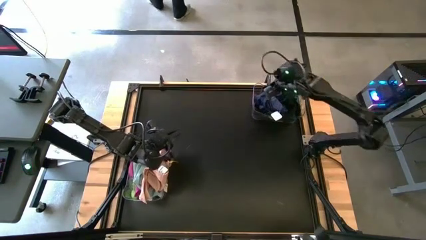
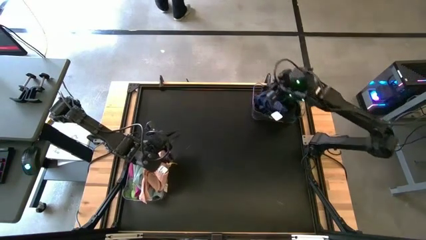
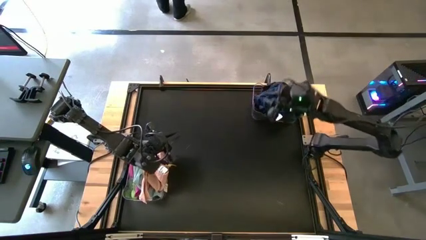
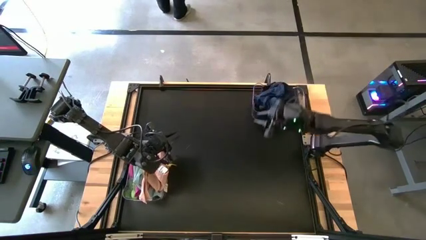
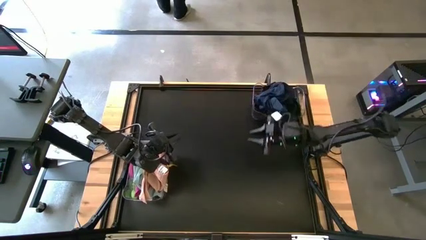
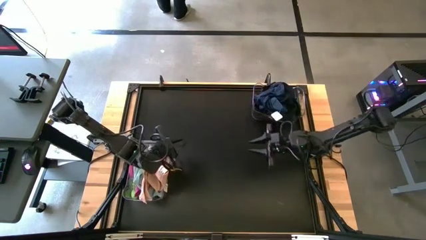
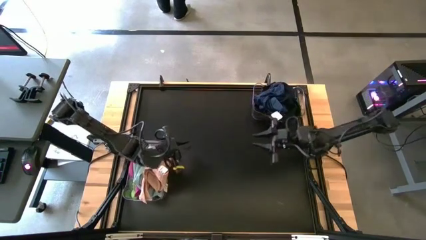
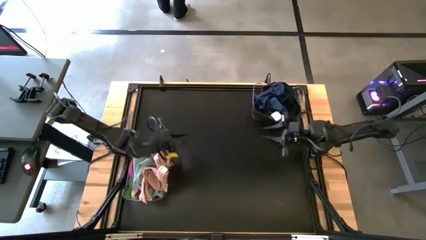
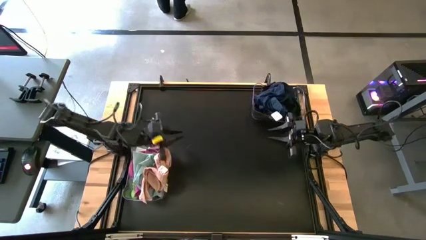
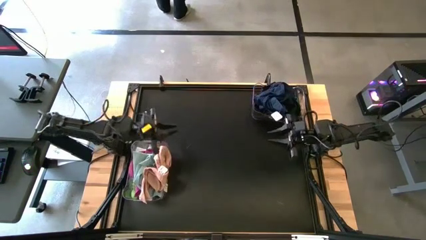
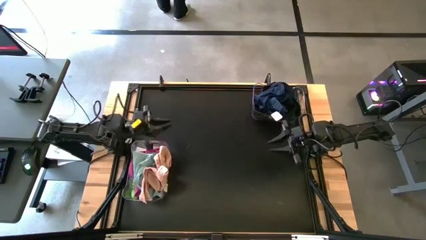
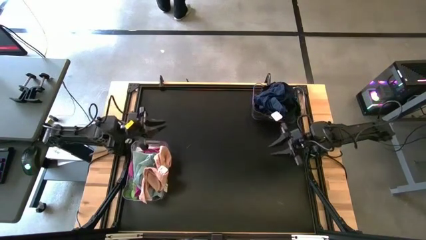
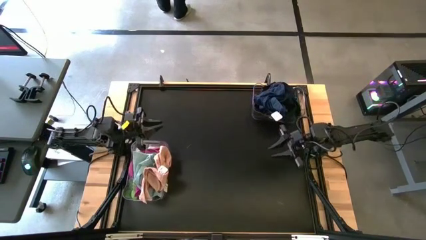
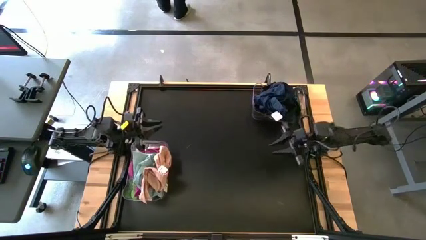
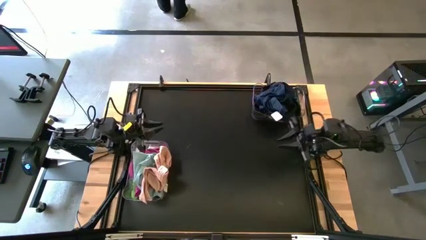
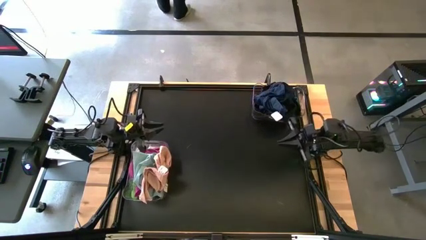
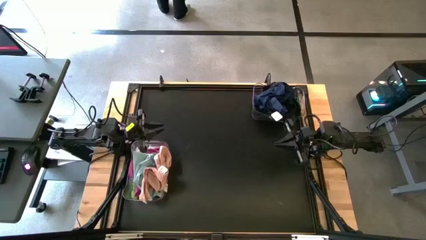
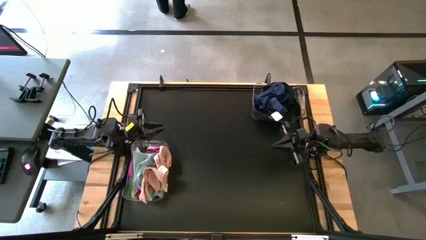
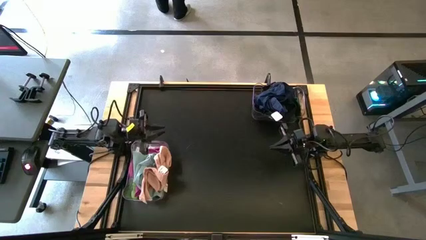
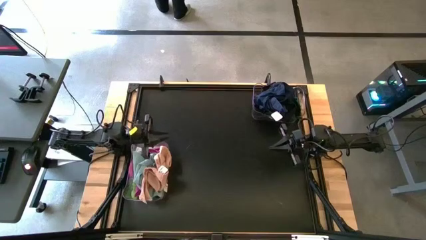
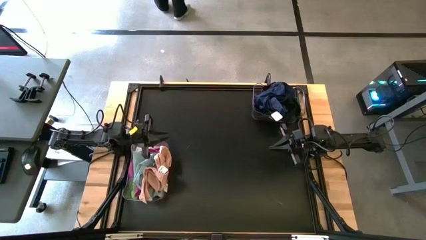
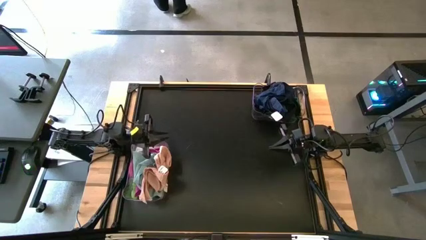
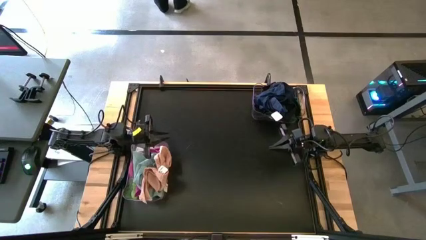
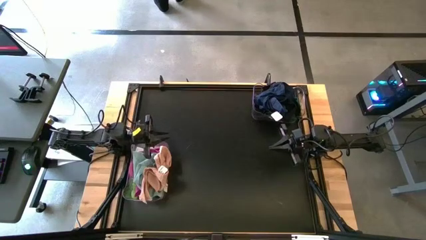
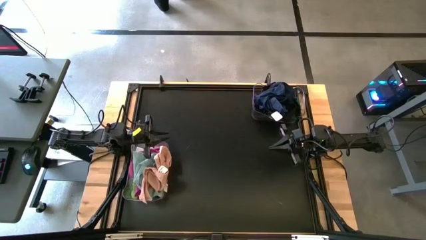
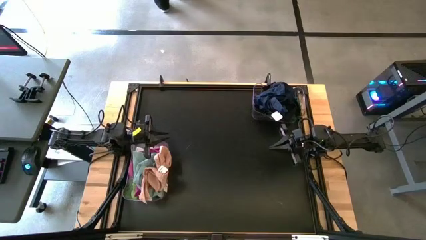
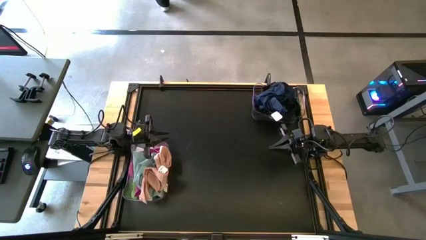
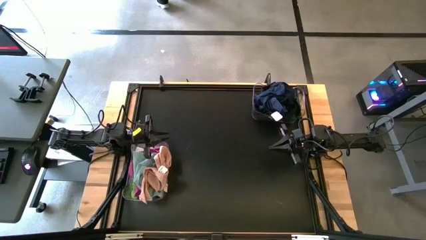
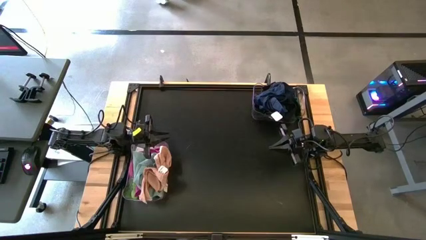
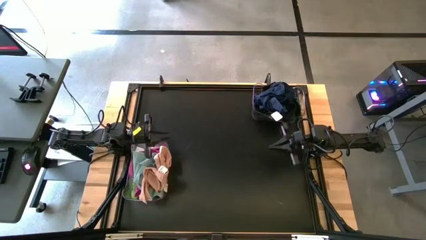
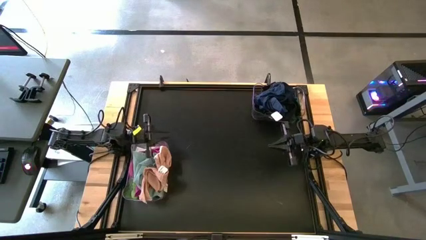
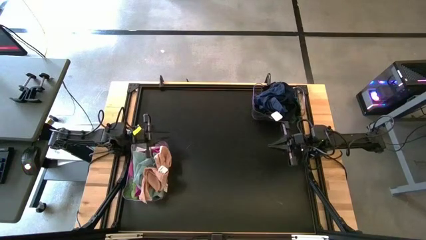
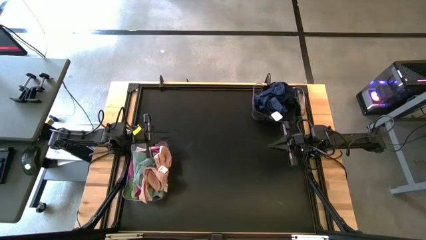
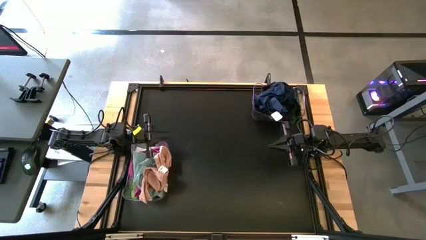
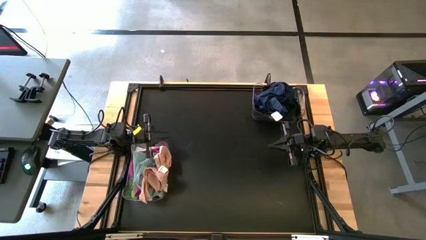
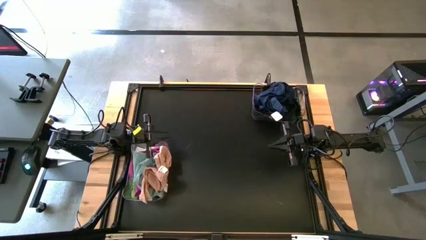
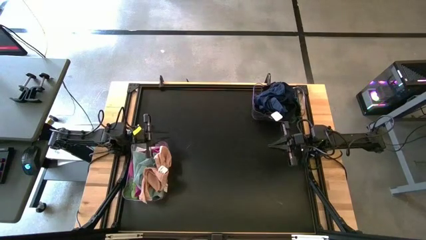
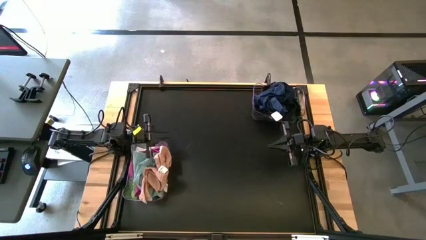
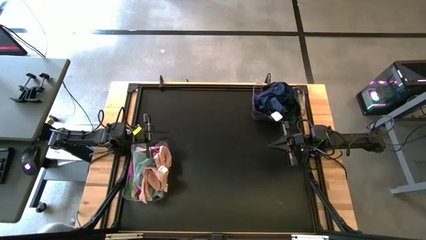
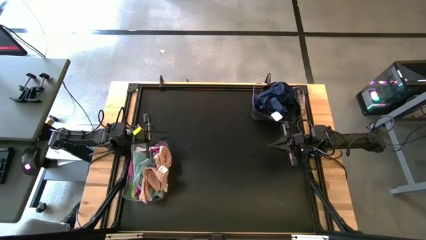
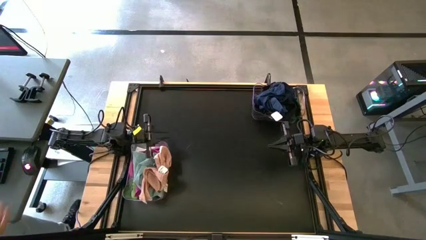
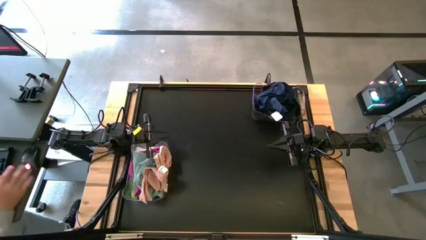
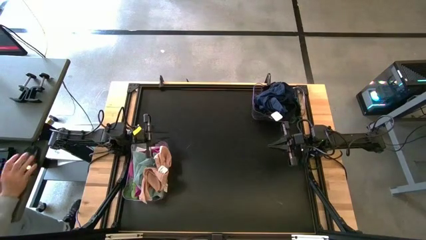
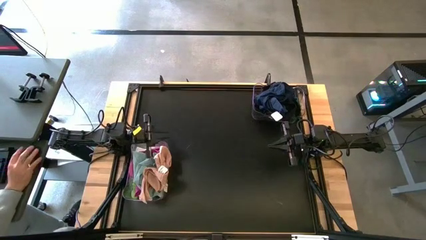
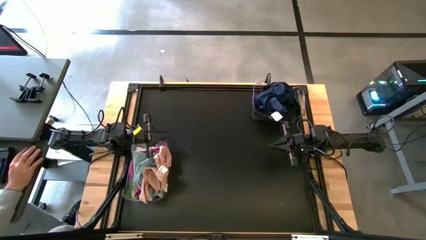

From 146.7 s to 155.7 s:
Task: Sort towels by color in basket
Return to Home Position

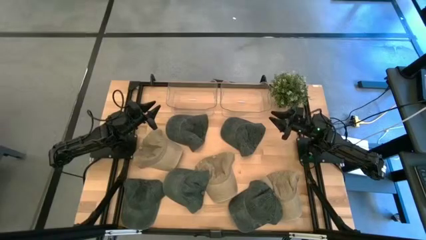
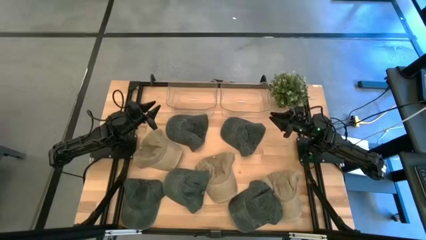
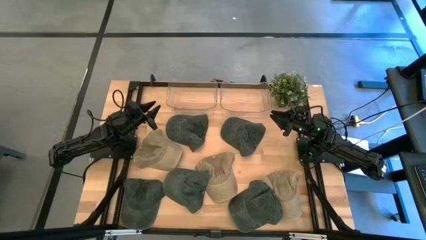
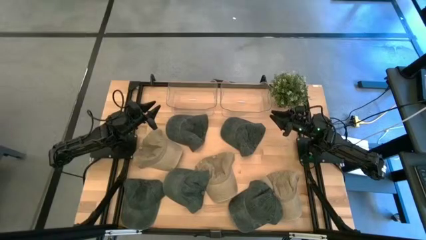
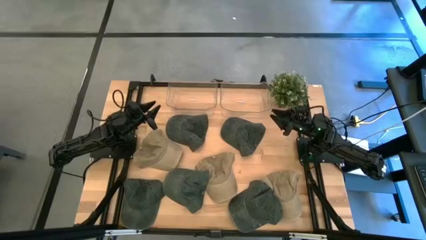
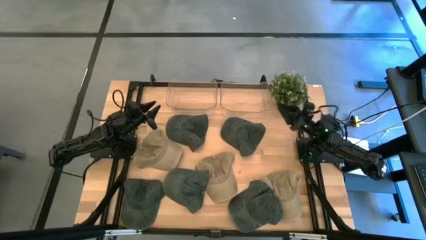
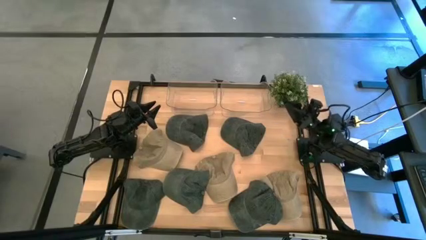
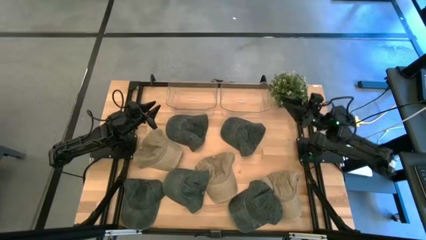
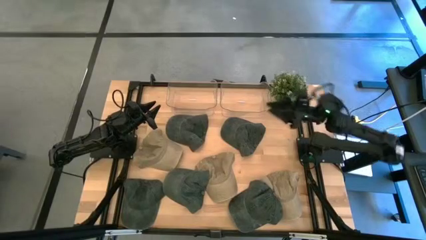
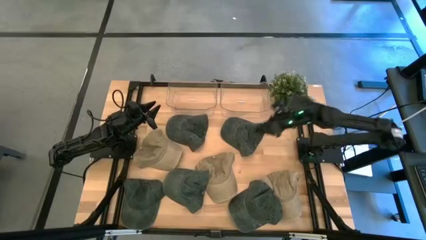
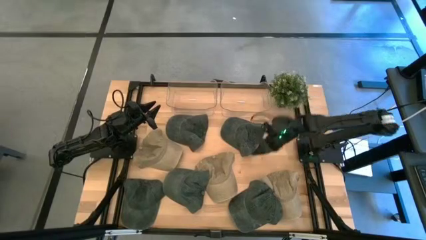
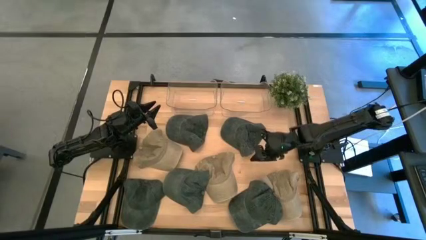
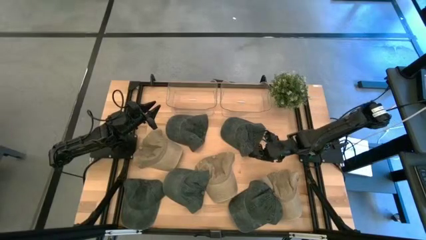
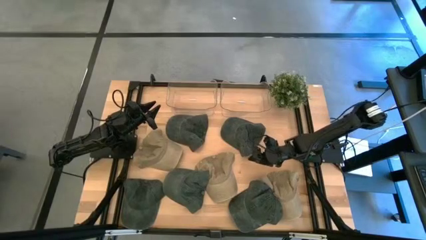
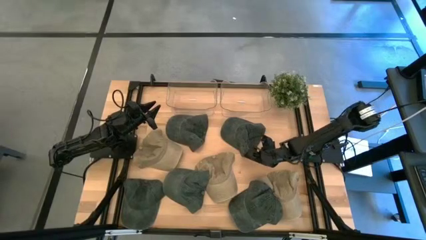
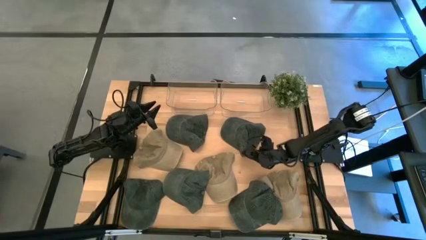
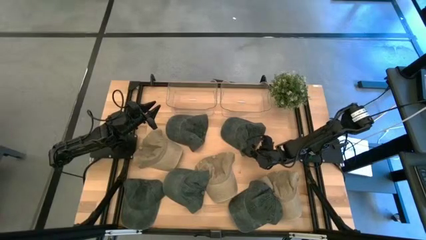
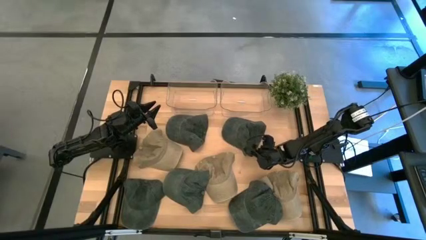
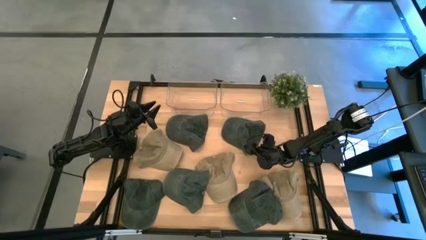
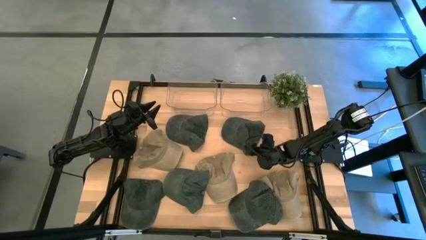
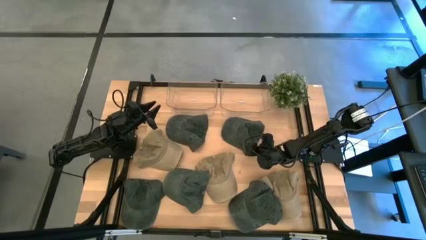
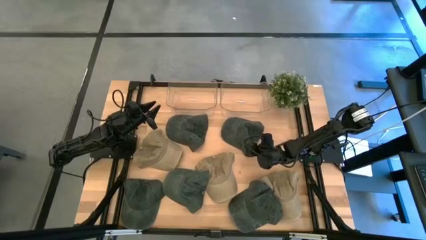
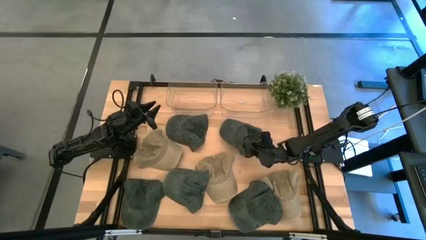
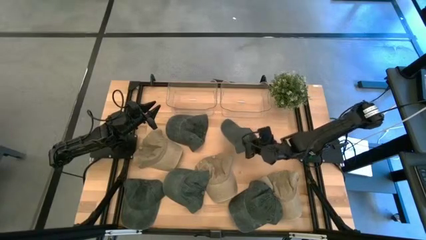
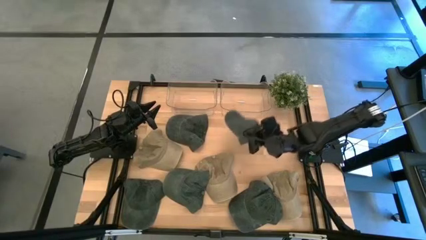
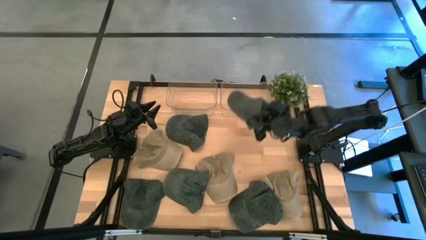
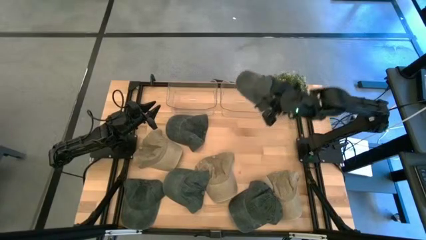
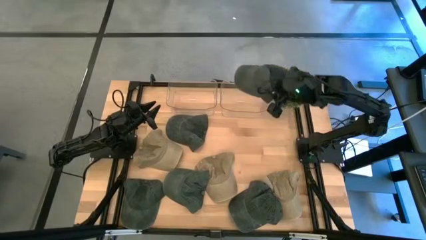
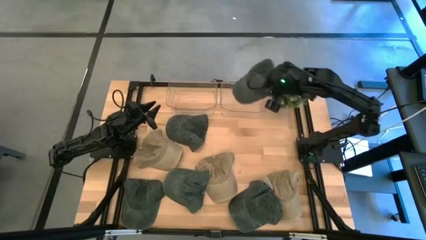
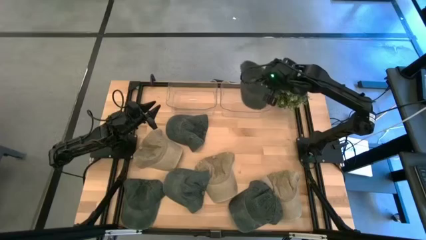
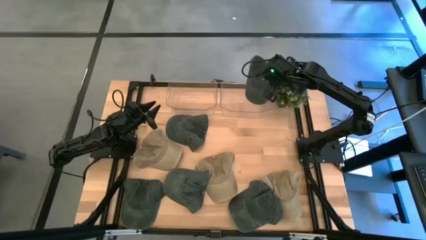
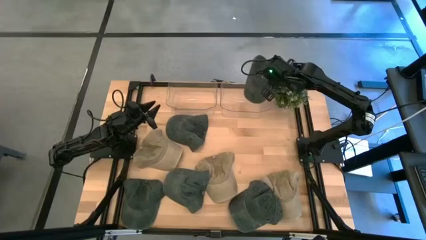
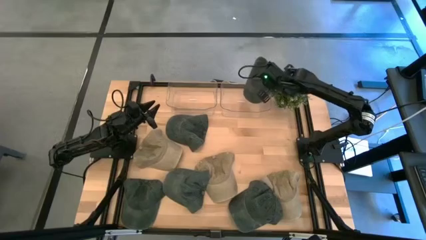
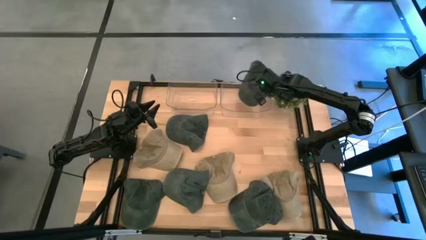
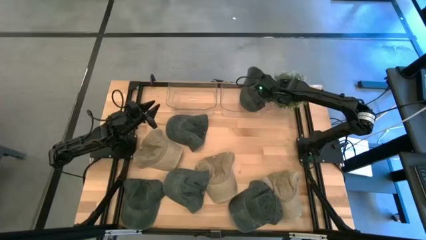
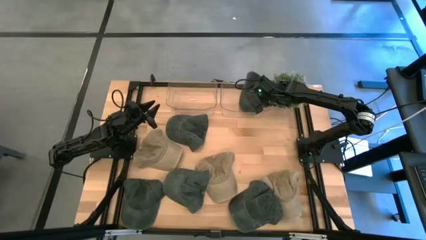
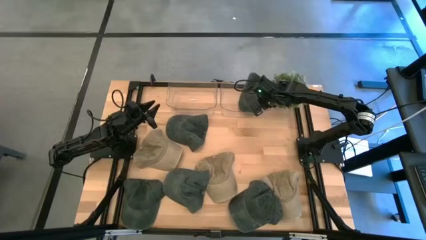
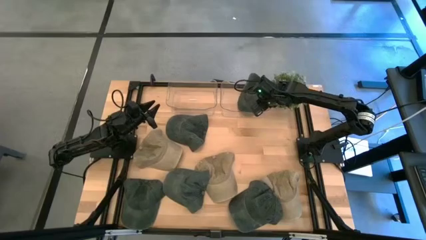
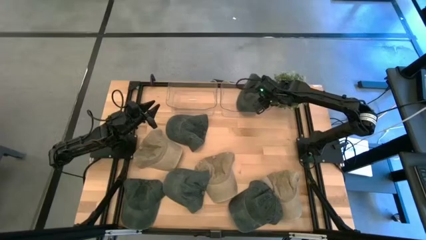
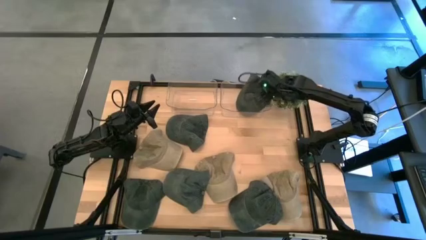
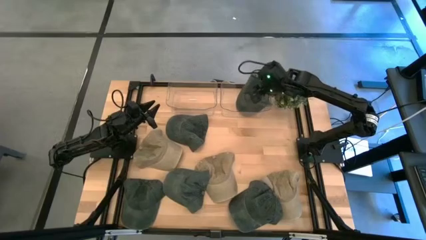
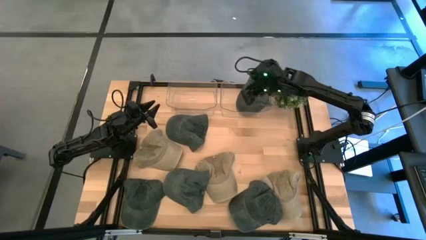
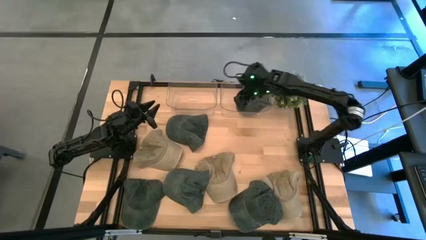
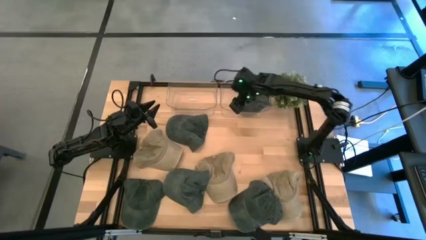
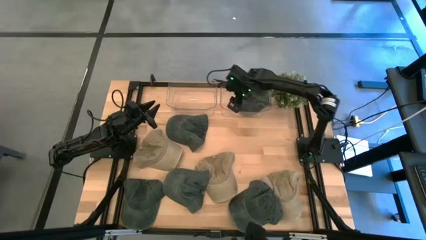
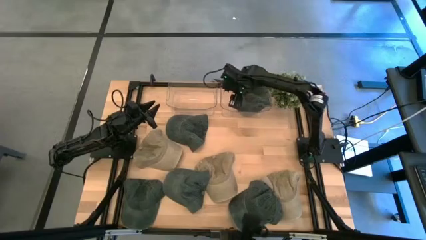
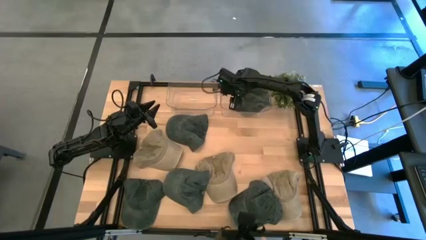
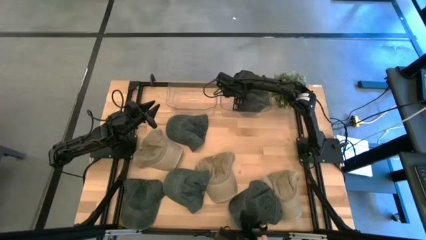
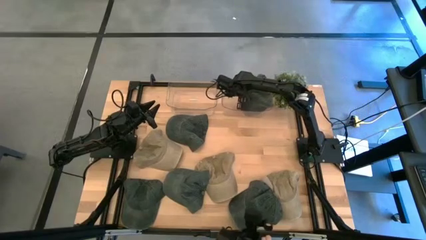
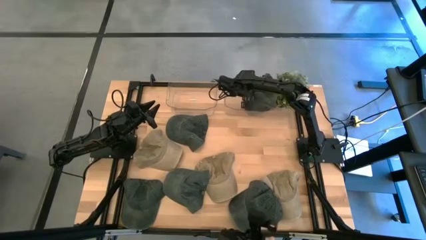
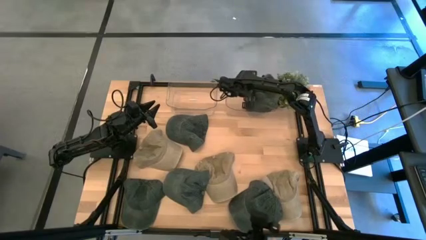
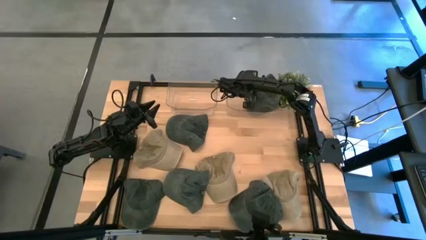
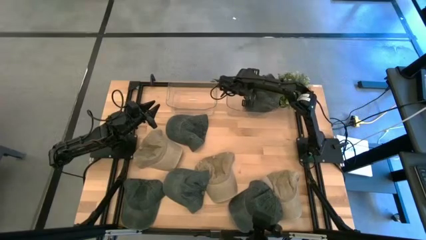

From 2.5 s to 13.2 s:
Task: Pick & Place hat
Put the black cap into the right transparent bin
